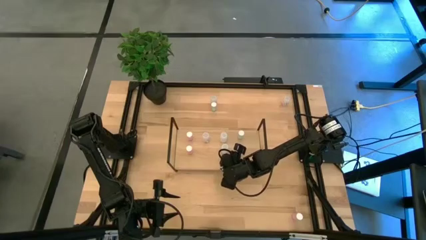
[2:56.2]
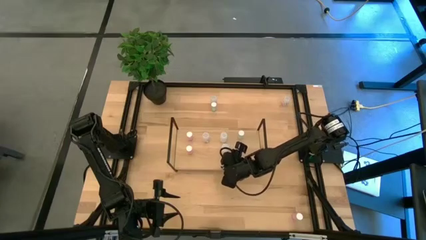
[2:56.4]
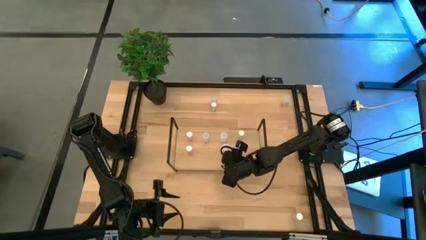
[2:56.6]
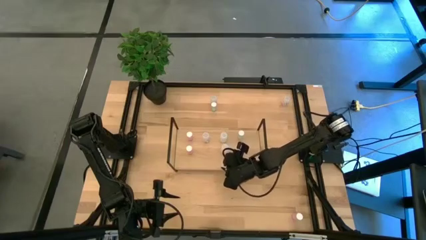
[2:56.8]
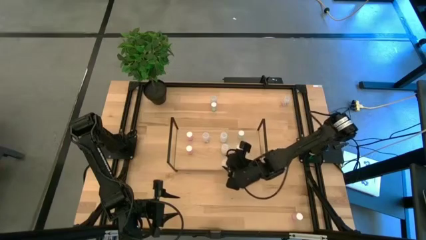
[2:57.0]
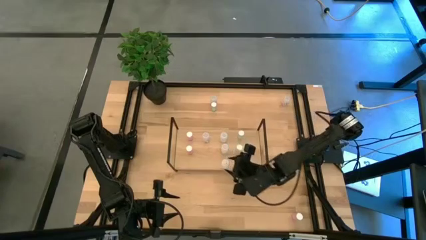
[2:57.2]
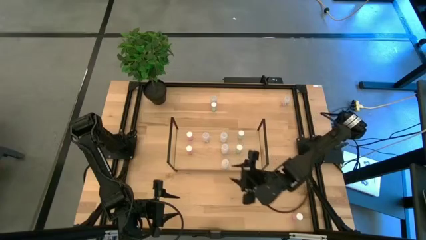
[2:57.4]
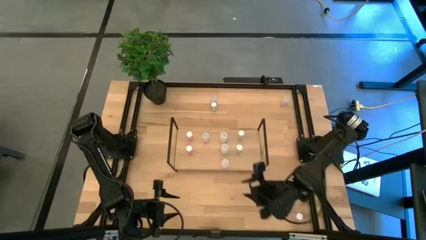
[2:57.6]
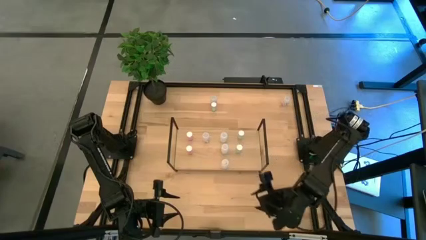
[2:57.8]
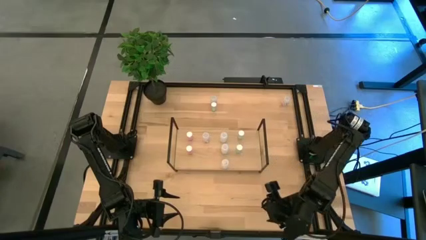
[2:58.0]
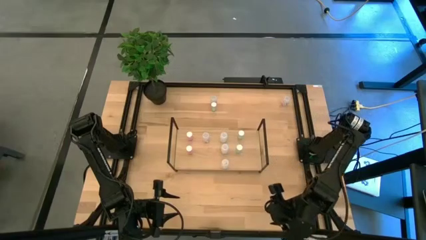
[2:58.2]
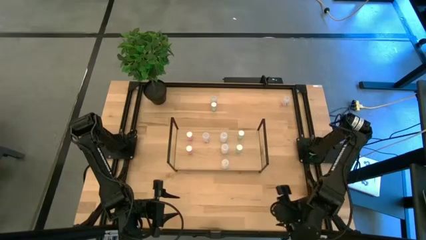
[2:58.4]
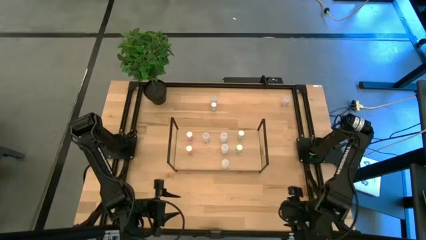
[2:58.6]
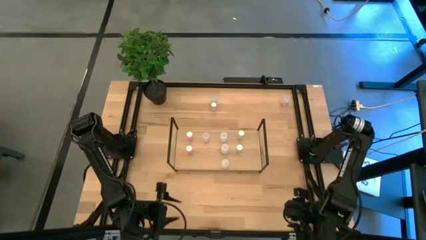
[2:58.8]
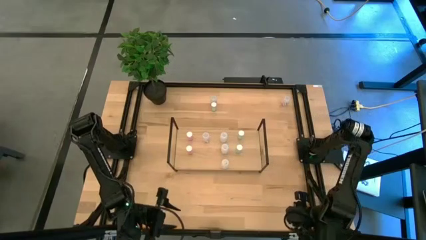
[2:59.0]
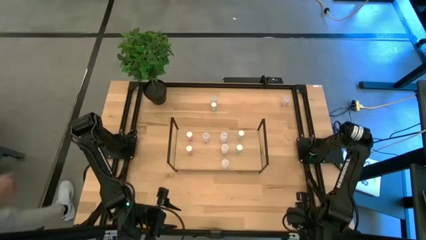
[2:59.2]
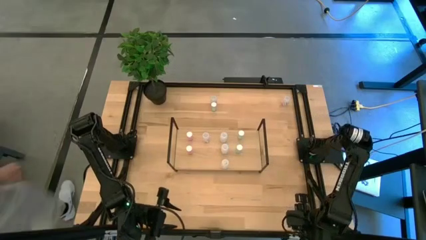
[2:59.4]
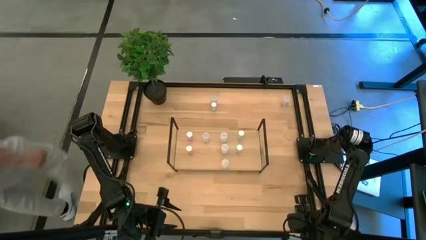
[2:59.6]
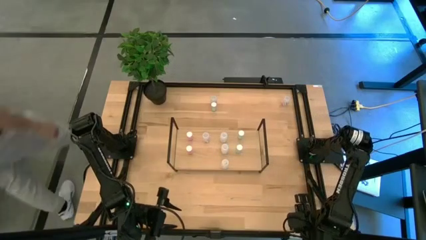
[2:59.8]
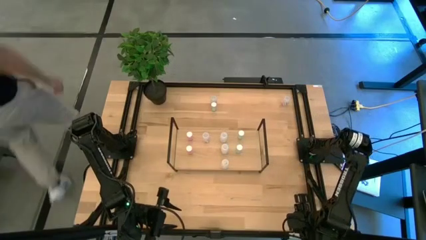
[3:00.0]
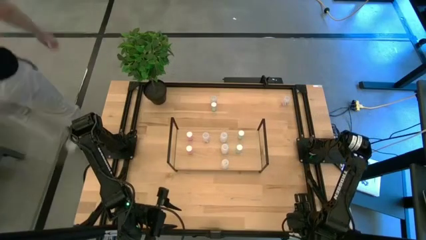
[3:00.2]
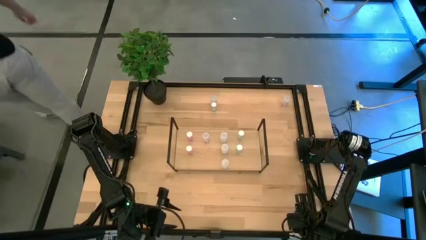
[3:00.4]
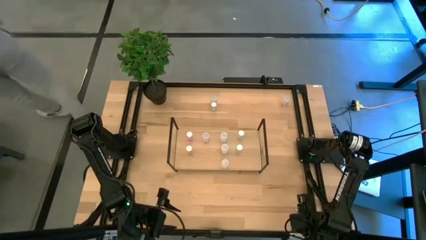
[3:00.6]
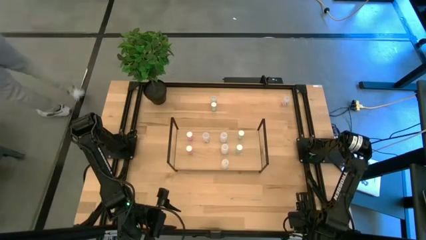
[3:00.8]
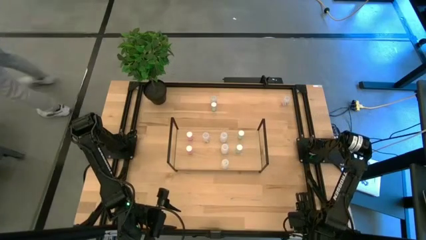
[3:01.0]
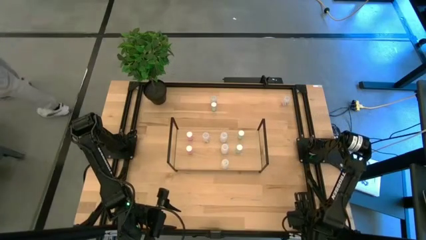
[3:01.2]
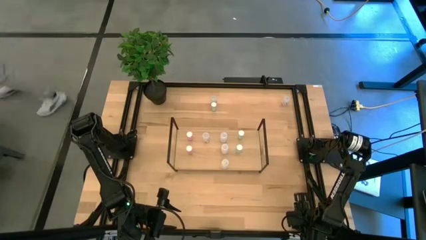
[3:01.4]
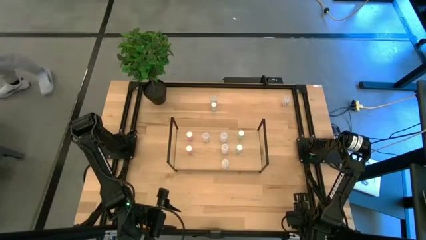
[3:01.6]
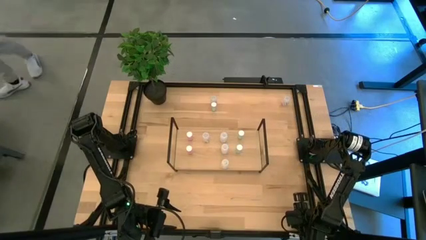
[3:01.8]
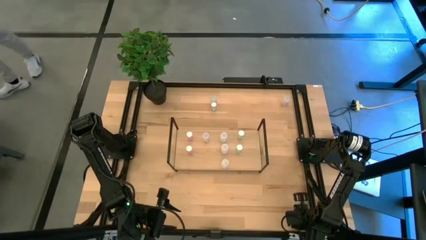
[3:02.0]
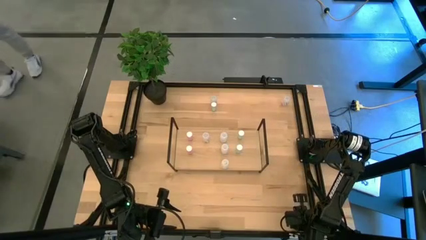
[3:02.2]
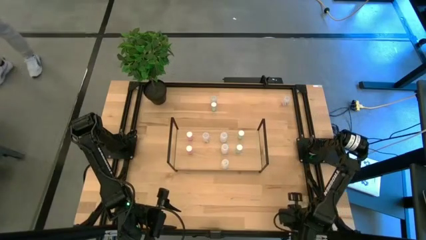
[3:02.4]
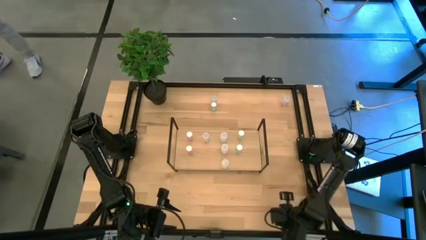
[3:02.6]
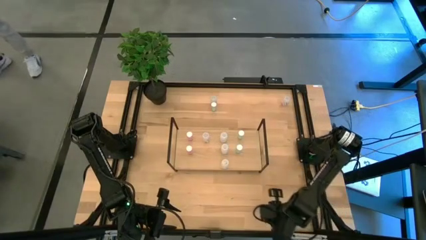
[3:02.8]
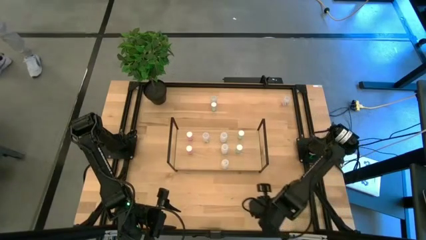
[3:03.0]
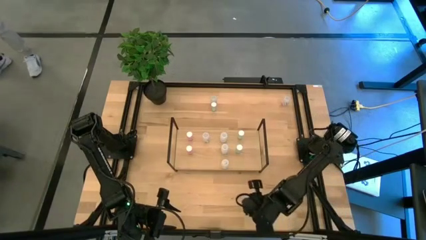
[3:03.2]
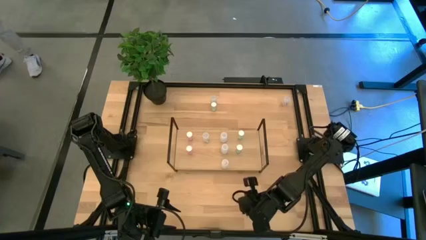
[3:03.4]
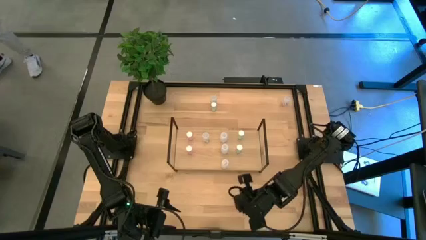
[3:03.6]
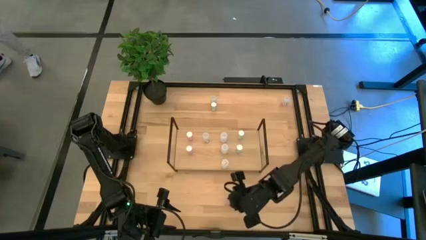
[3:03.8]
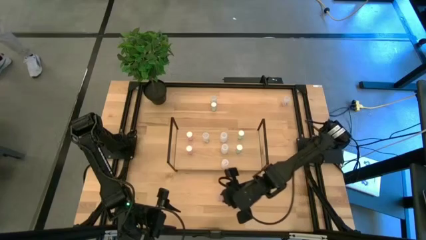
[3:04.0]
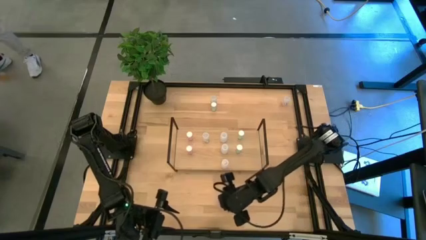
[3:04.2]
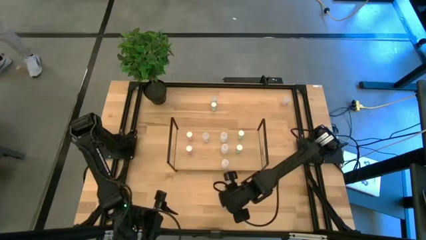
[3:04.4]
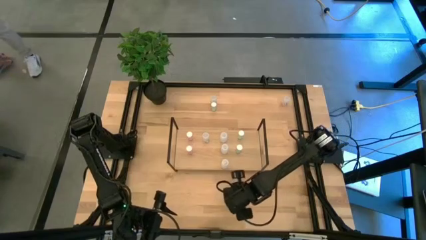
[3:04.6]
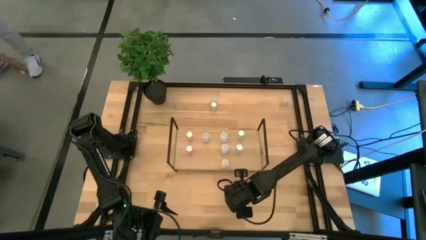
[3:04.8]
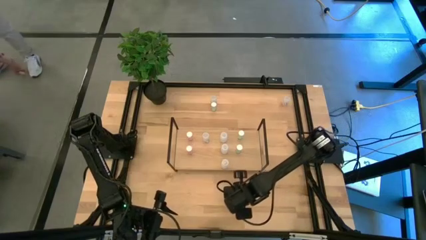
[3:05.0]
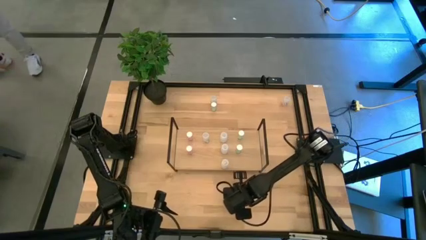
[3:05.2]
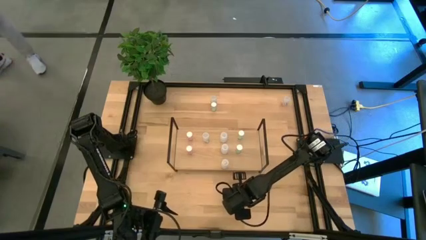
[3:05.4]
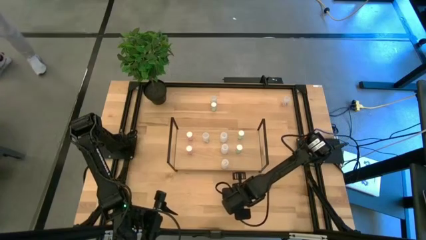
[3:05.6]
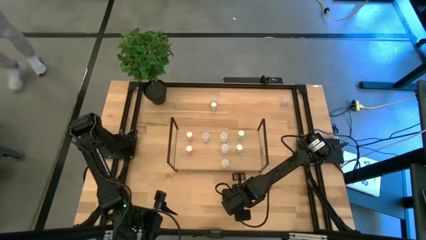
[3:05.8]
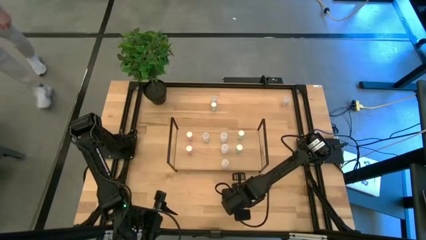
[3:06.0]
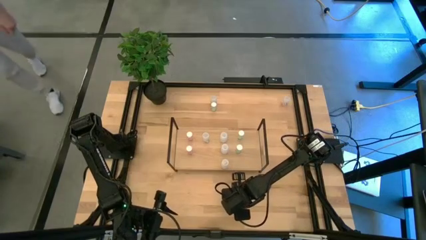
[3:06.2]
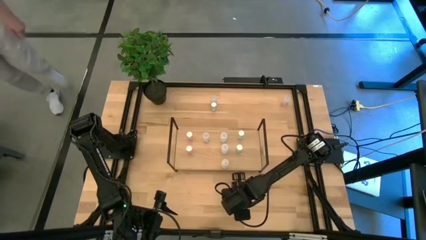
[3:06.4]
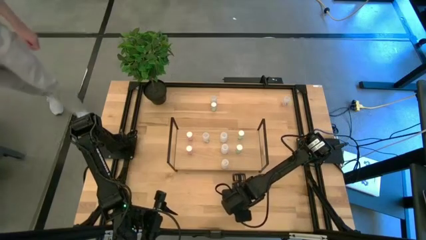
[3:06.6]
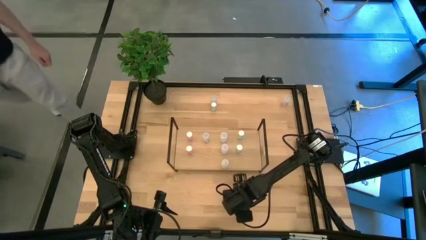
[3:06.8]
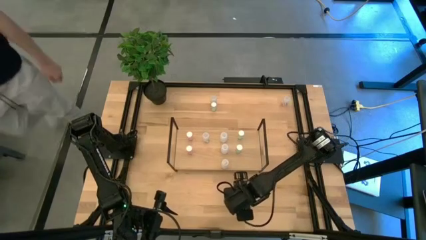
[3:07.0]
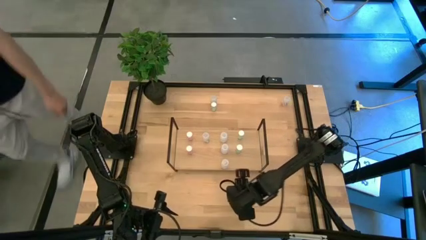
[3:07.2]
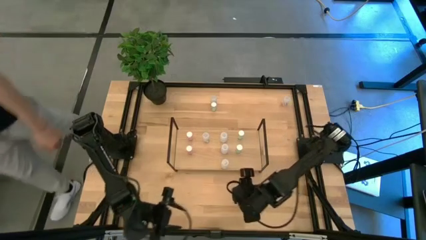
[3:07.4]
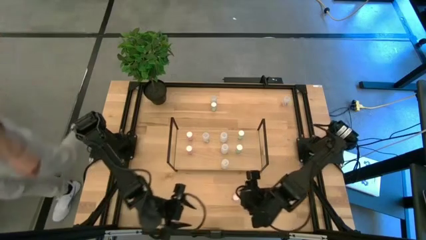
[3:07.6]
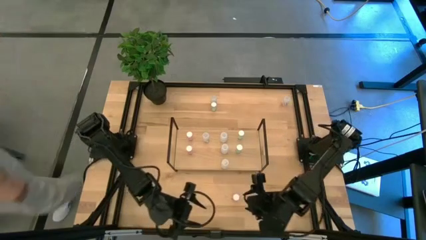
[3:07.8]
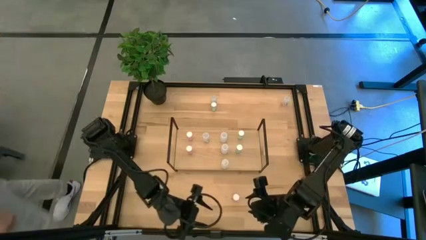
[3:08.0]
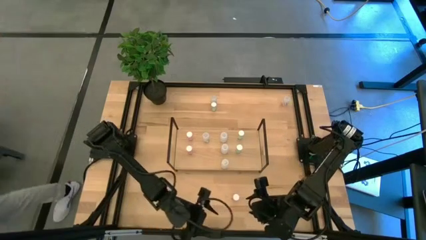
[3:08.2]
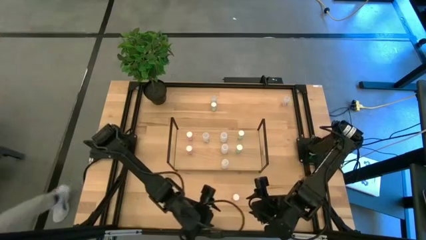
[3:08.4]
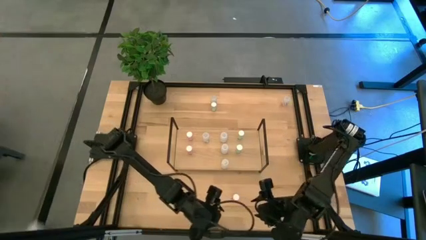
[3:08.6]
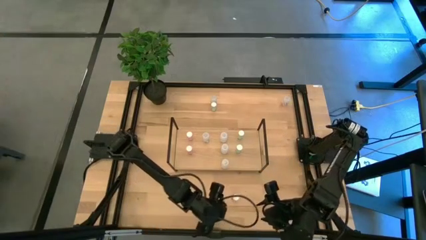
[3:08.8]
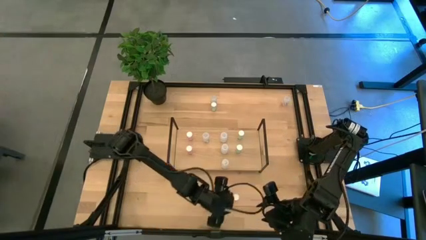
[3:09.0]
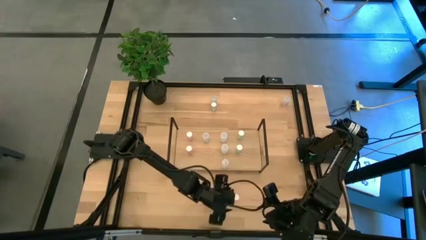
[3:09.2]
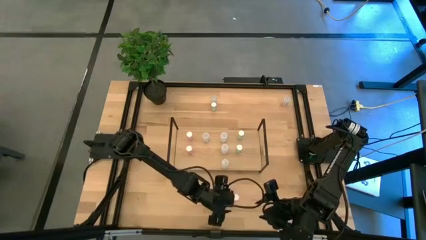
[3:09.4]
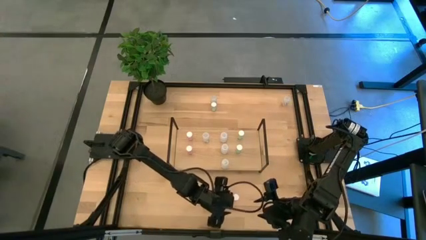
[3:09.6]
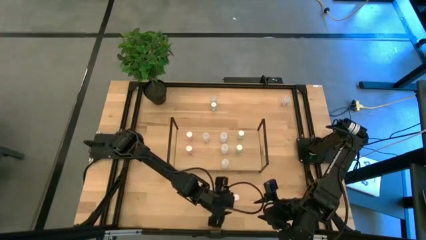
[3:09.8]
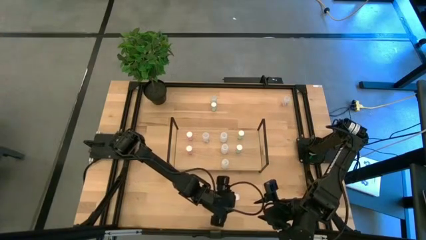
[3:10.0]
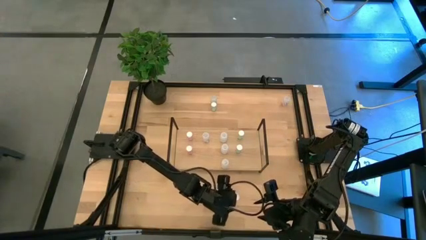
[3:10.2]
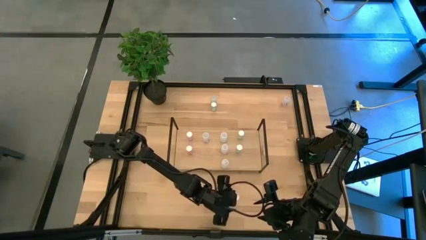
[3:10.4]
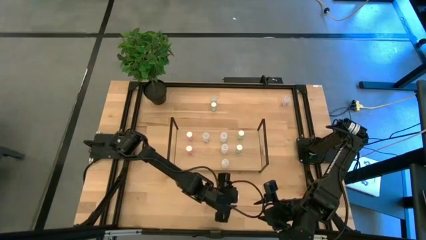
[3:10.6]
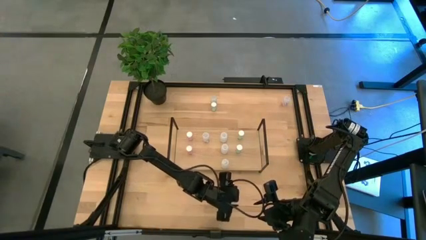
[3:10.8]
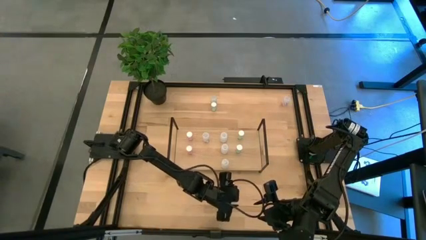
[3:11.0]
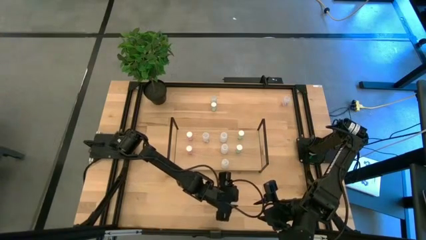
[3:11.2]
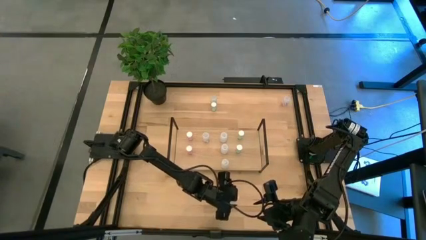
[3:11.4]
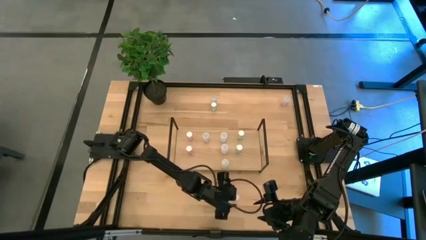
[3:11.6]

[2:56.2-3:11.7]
Task: Pick and place medicine bottles onto shelf by color
Put the pink pill bottle on the shelf aligned with the other pink pill bottles
